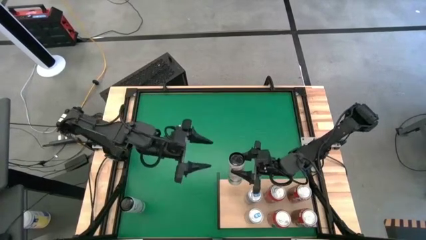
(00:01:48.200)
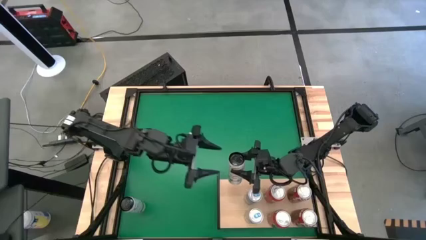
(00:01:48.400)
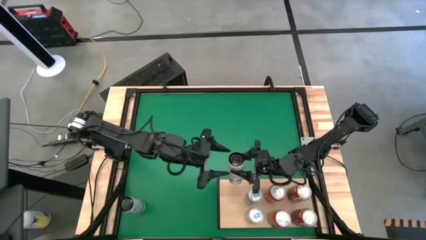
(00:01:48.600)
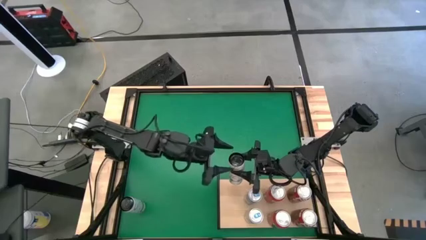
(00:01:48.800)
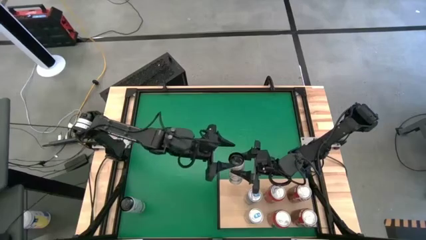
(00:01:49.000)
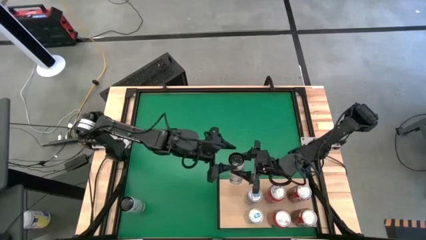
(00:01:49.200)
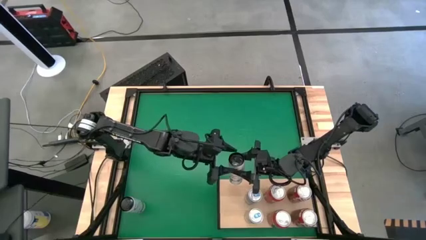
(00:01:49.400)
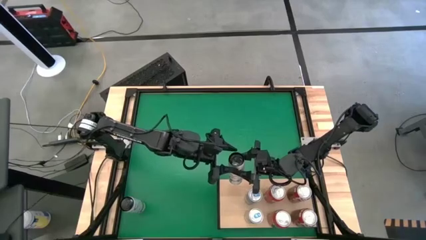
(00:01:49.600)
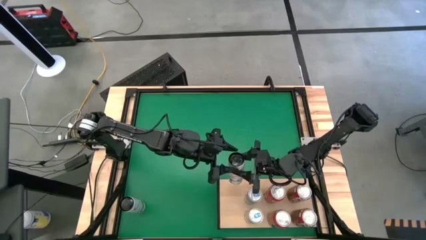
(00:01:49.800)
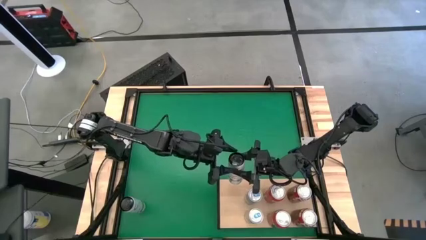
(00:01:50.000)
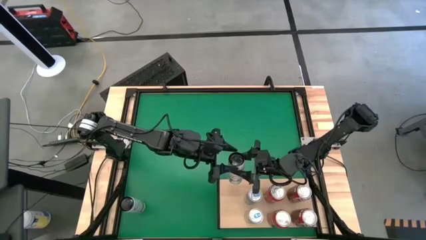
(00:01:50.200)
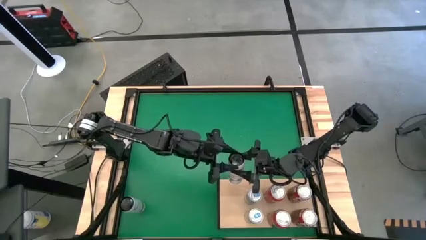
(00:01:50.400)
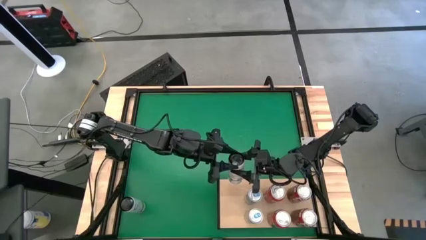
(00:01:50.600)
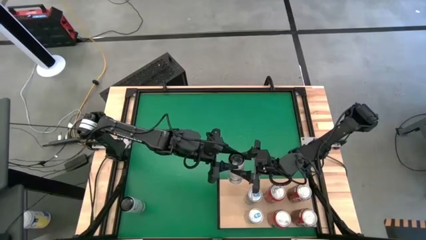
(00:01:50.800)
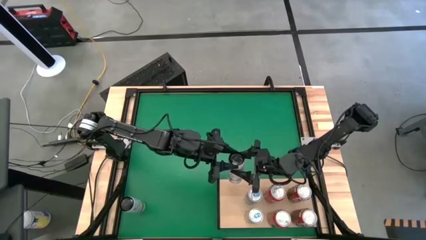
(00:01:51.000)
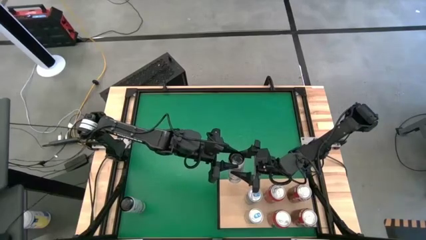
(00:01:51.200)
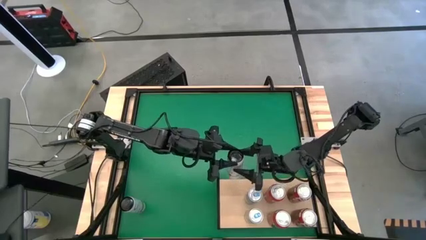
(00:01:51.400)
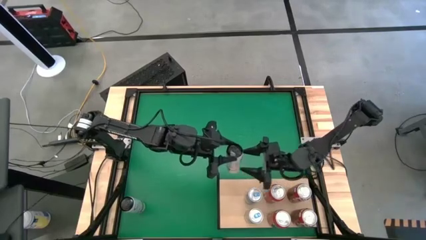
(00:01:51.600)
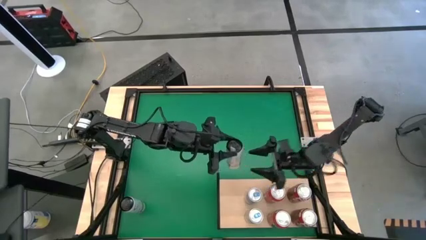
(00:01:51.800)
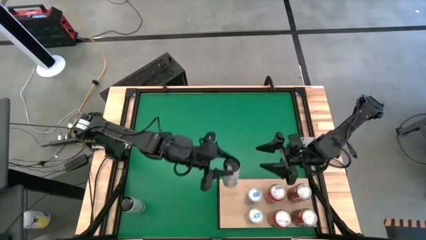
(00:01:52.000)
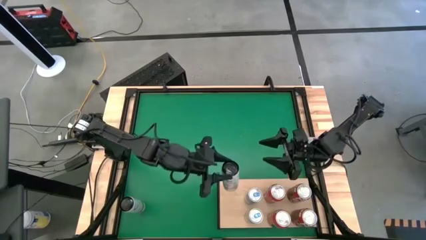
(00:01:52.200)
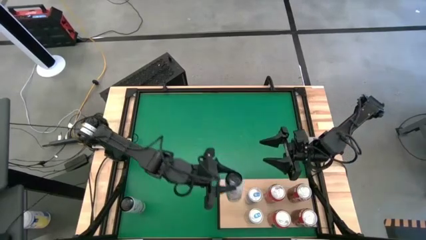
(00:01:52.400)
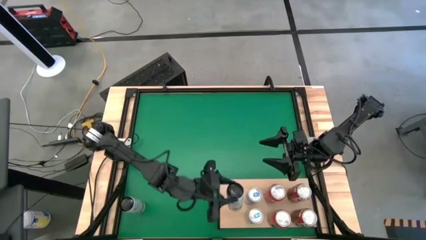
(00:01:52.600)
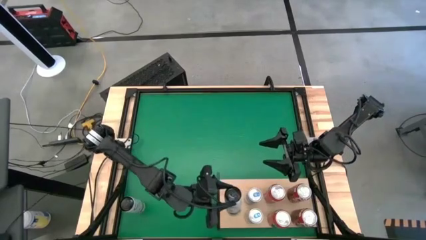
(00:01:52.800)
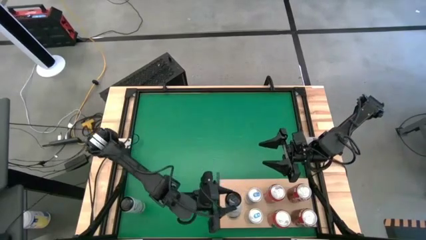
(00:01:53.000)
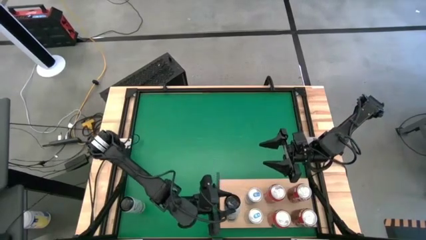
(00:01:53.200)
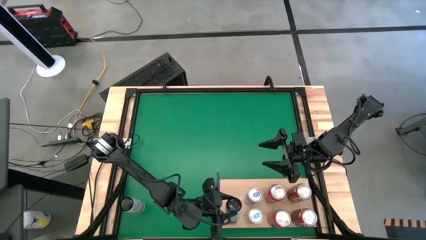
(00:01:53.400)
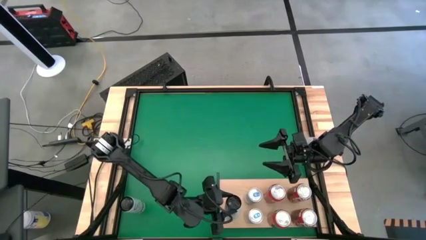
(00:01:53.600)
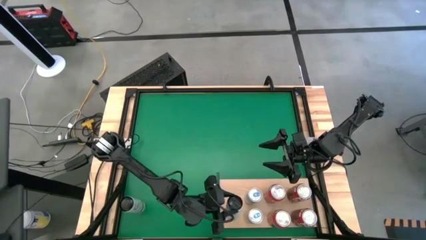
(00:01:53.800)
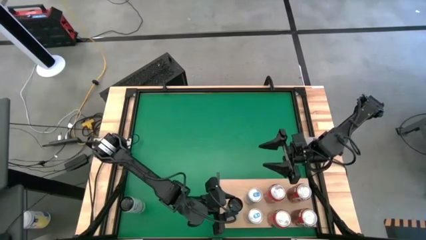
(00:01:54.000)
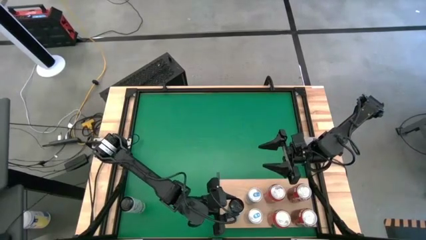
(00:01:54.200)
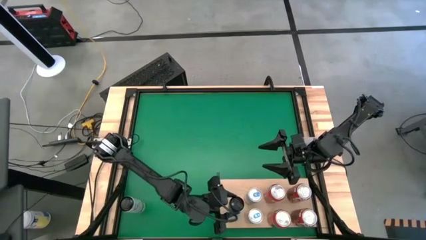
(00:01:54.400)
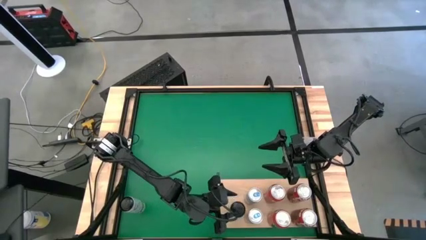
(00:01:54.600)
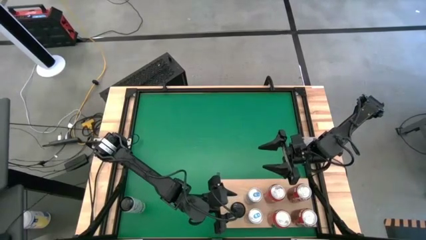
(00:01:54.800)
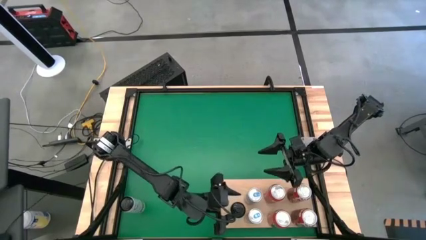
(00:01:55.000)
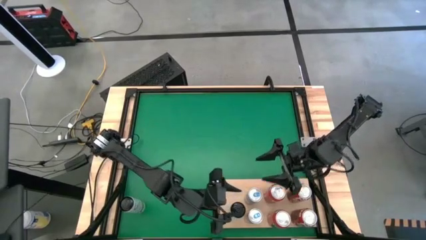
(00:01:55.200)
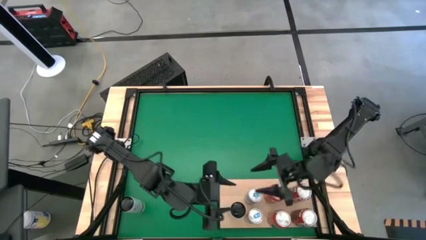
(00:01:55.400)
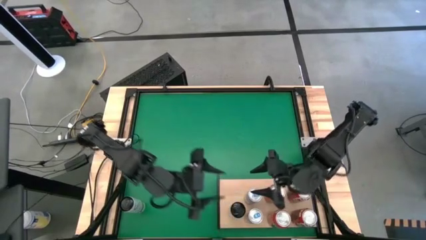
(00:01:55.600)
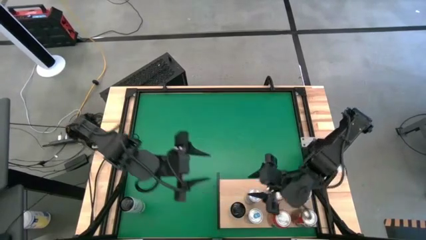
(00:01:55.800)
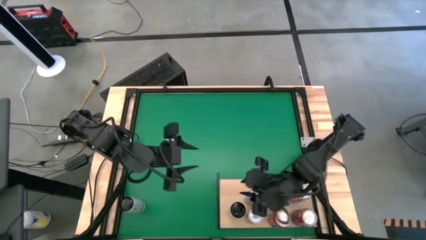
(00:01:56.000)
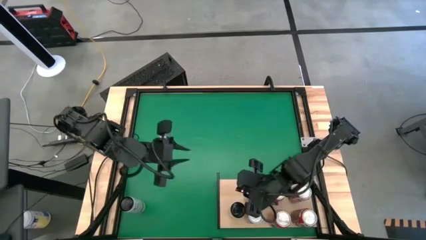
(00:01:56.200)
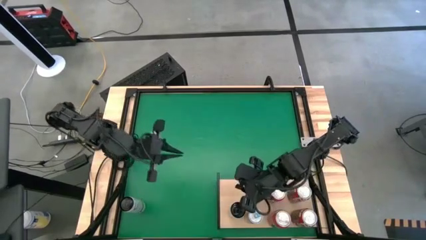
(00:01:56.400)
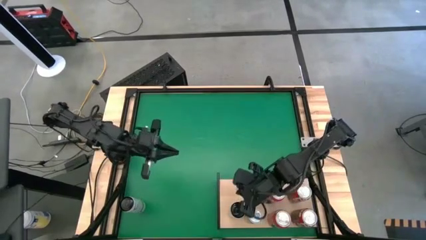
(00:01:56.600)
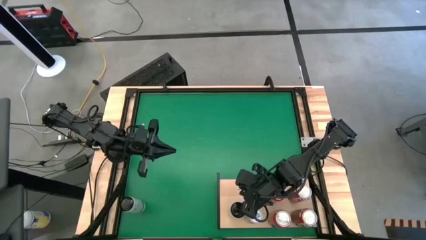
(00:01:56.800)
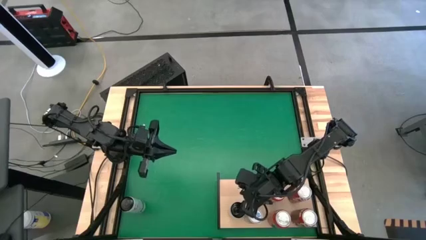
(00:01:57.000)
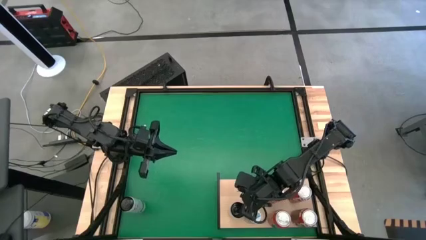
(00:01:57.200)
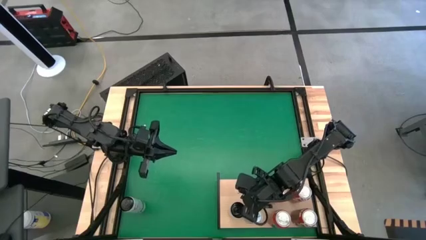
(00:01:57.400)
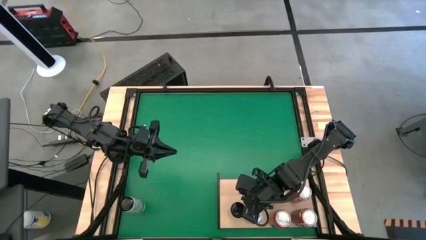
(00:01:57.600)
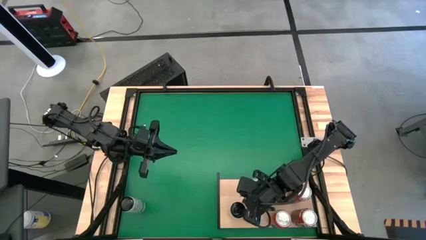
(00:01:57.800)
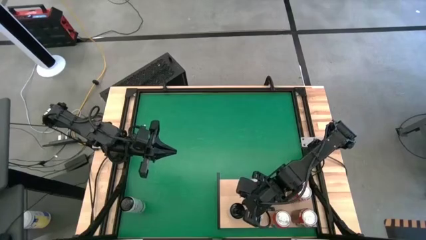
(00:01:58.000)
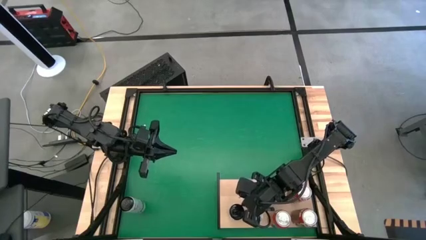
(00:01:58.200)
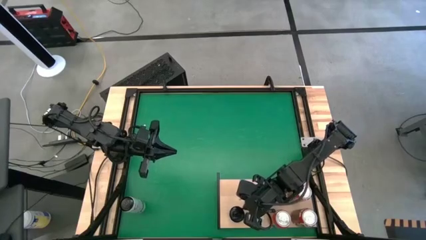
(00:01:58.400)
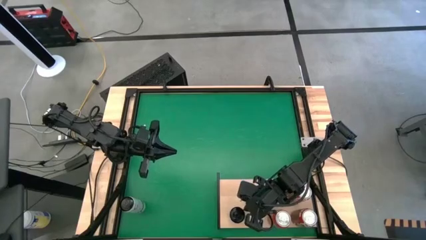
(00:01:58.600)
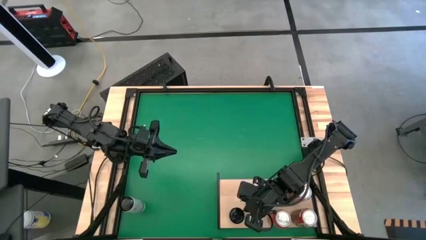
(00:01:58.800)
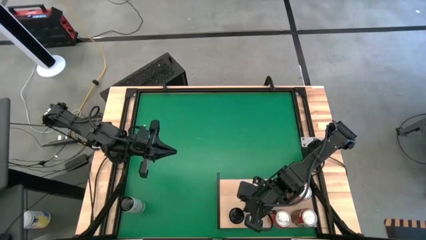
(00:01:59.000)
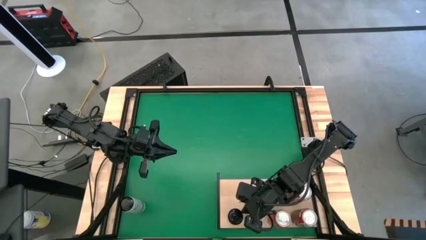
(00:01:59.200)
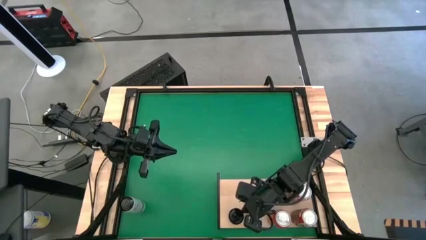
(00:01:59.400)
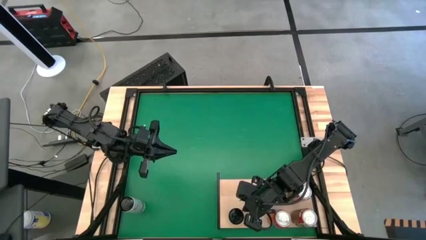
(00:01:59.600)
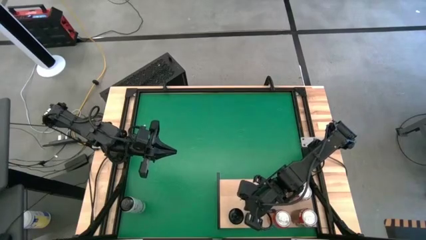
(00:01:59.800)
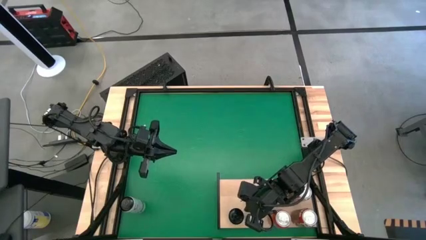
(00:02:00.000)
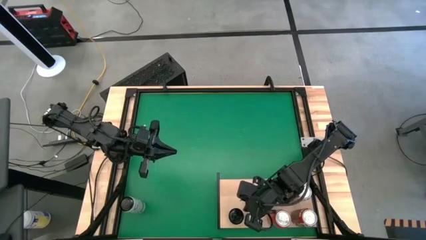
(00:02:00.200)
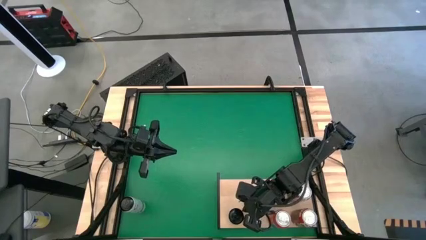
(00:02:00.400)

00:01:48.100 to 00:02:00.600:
Task: Place canned beverage on shelf
Put the top white yellow soda can on the shelf

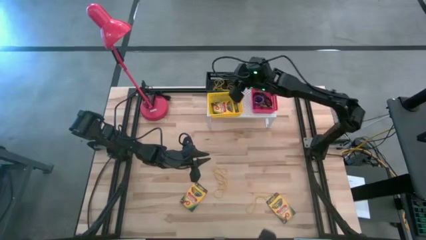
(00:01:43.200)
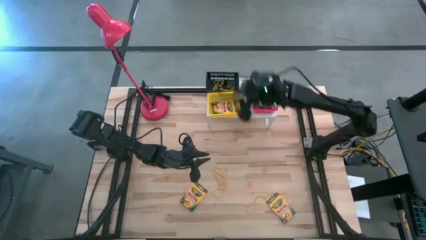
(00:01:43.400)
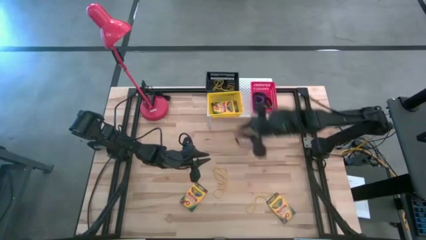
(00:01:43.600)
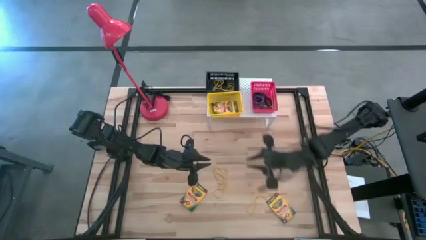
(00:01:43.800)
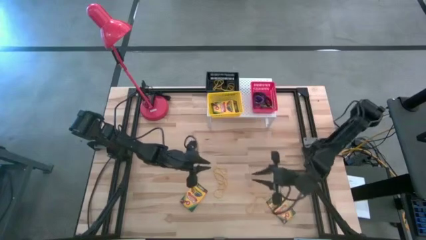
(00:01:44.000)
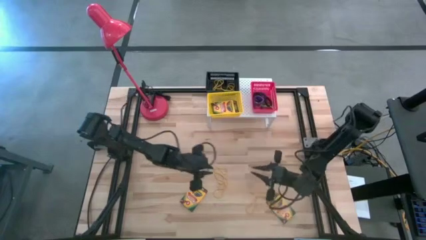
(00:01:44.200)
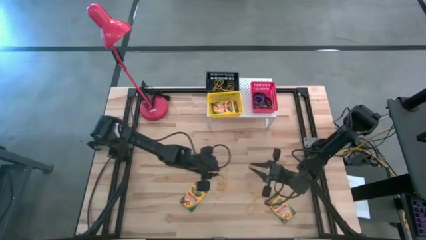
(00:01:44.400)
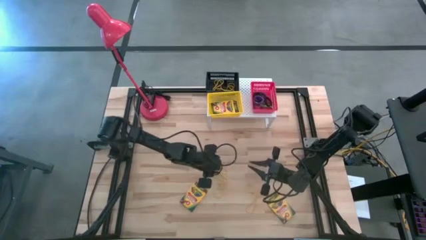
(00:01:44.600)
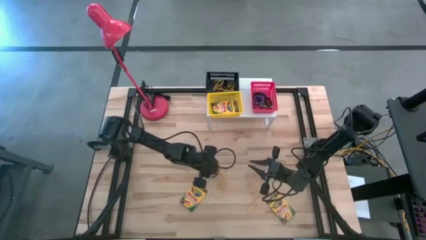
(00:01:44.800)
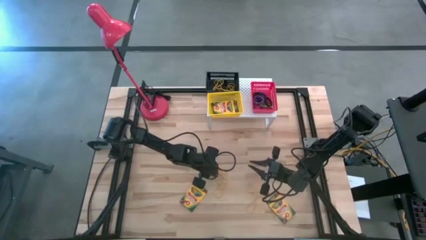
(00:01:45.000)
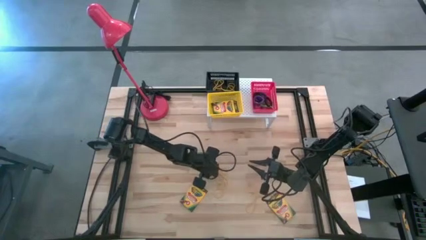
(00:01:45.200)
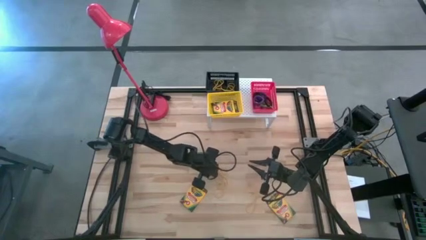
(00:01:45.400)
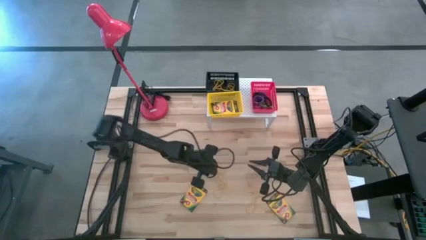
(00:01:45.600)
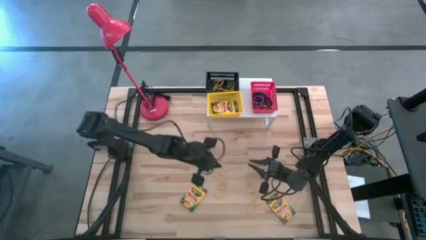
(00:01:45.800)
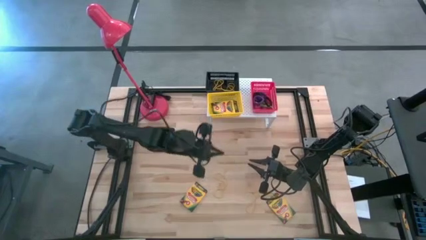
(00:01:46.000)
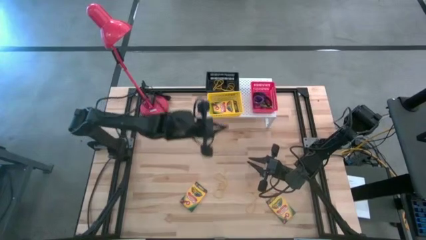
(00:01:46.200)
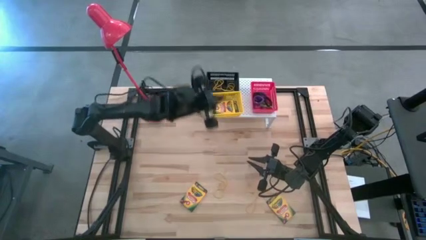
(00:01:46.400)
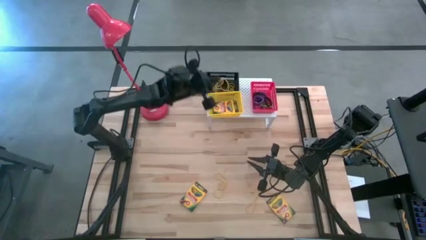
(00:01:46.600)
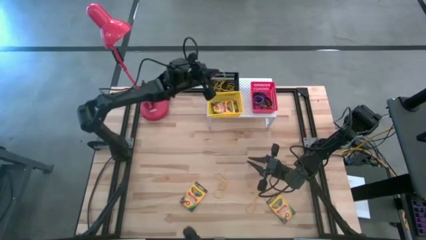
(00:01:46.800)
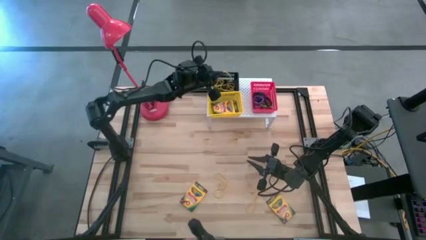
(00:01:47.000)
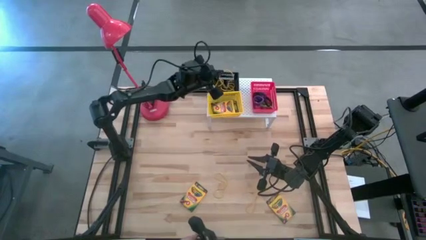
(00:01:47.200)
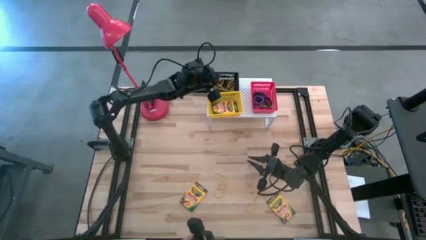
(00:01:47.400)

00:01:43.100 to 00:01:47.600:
Task: Pick & Place Office Desk Supplies
Put the yellow rubber band into the black bin on the shelf
